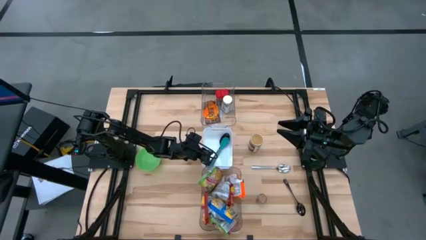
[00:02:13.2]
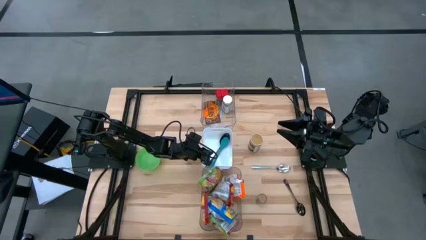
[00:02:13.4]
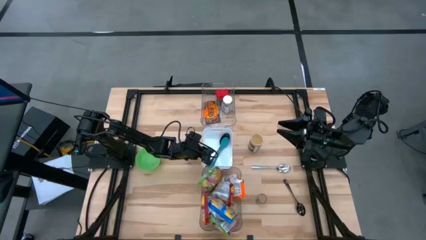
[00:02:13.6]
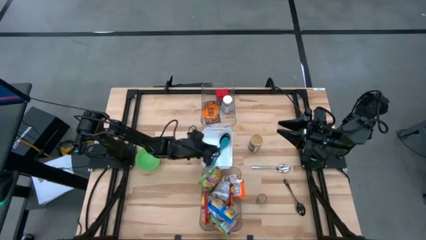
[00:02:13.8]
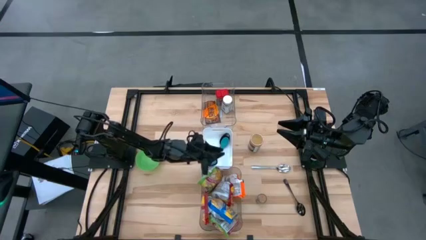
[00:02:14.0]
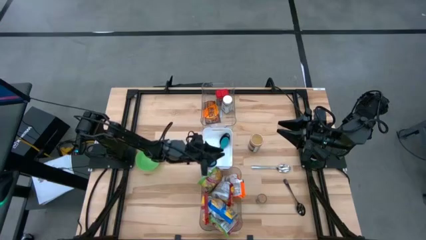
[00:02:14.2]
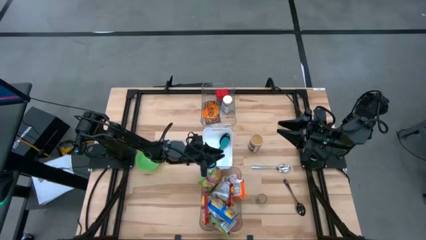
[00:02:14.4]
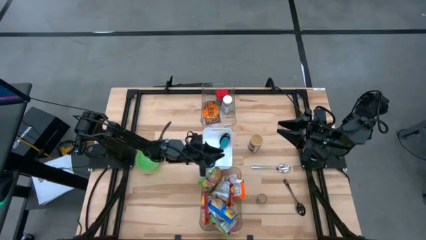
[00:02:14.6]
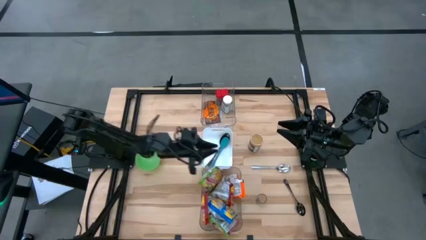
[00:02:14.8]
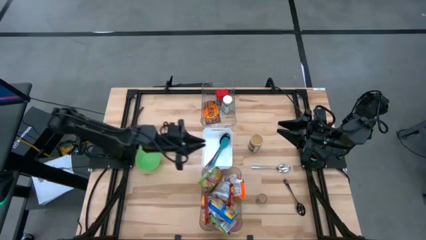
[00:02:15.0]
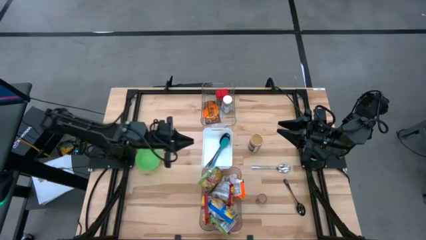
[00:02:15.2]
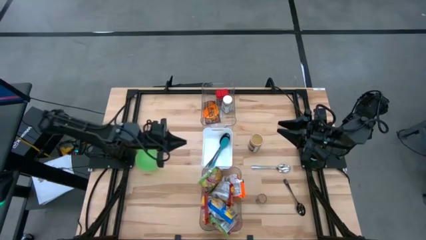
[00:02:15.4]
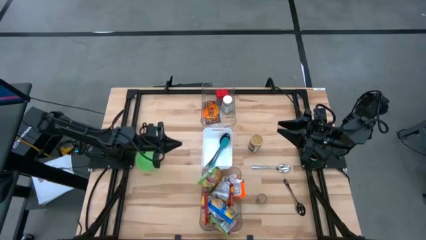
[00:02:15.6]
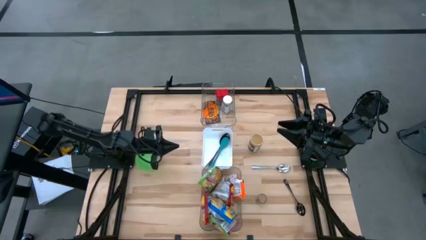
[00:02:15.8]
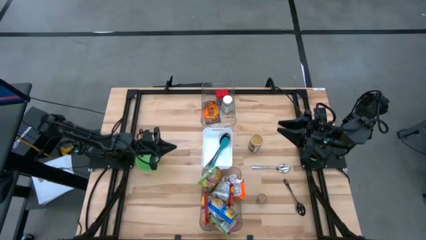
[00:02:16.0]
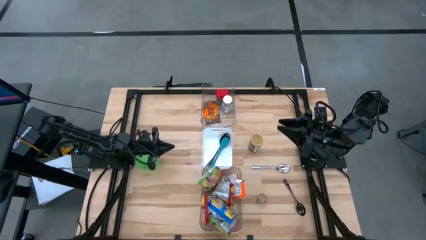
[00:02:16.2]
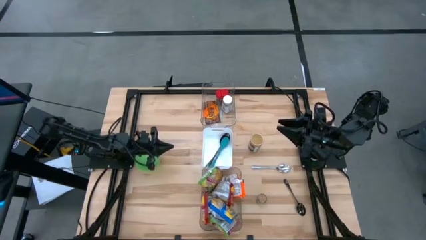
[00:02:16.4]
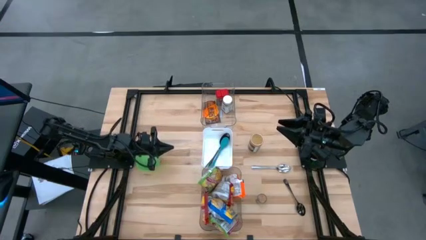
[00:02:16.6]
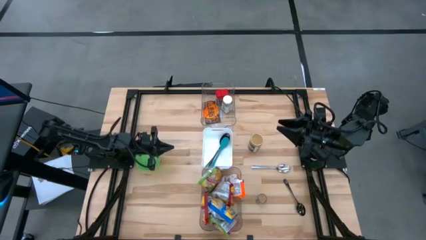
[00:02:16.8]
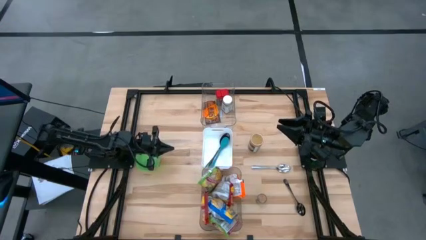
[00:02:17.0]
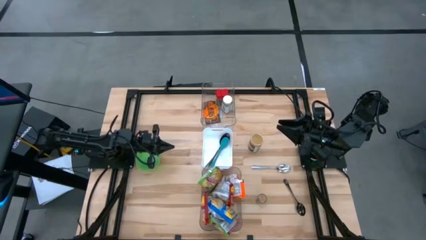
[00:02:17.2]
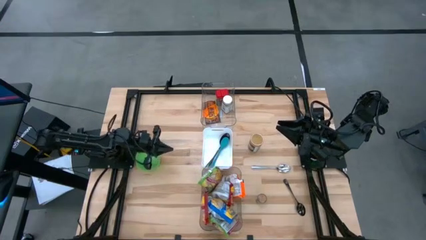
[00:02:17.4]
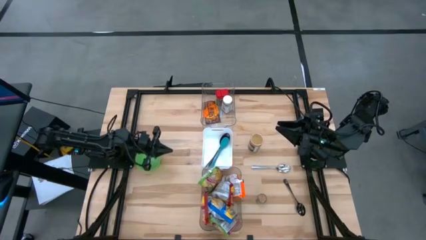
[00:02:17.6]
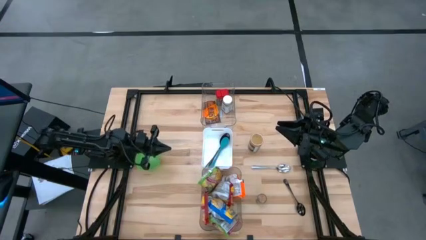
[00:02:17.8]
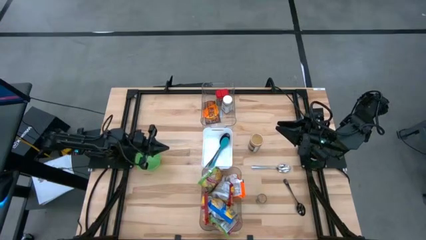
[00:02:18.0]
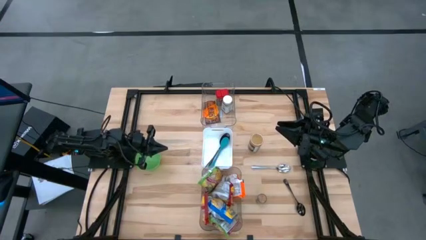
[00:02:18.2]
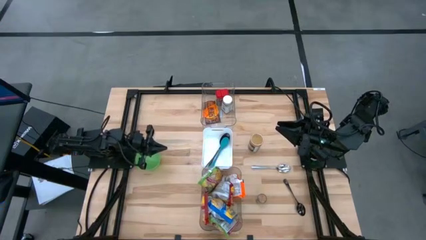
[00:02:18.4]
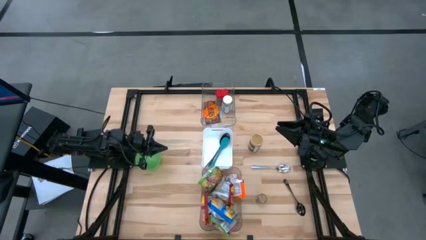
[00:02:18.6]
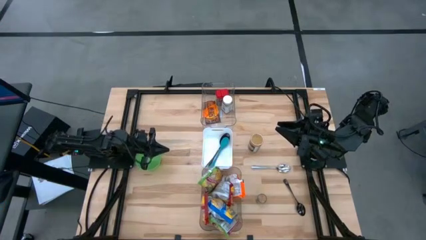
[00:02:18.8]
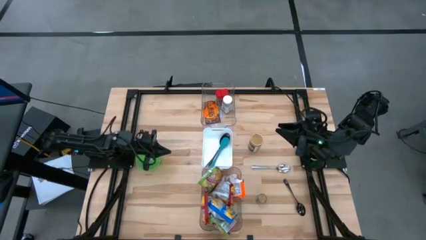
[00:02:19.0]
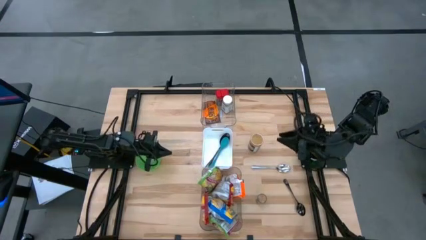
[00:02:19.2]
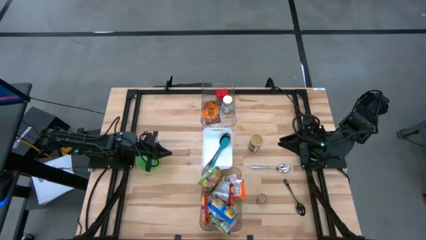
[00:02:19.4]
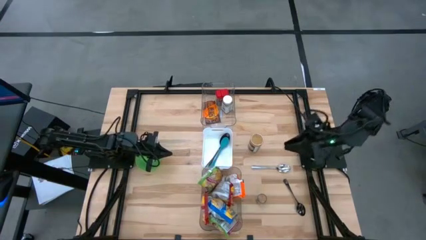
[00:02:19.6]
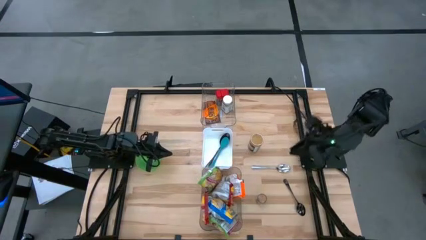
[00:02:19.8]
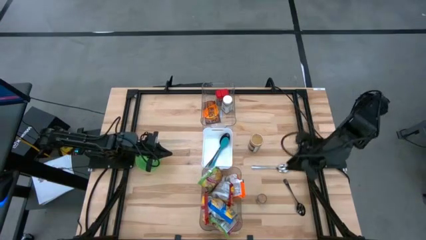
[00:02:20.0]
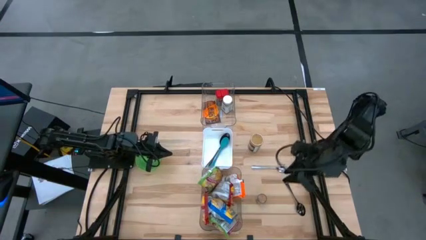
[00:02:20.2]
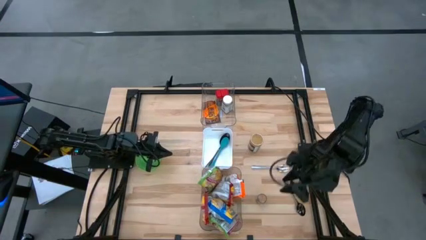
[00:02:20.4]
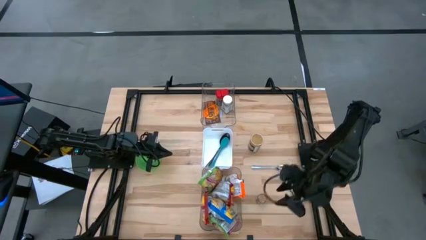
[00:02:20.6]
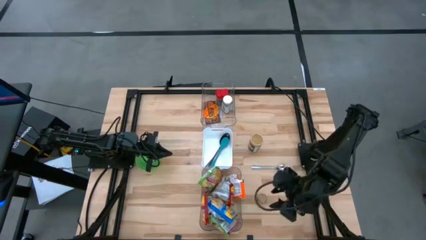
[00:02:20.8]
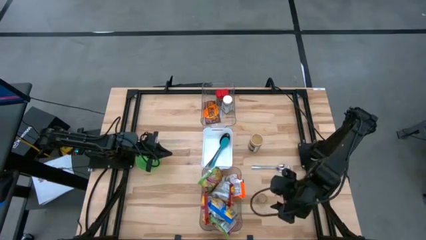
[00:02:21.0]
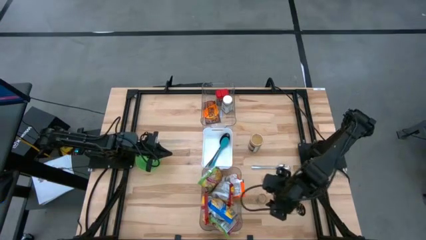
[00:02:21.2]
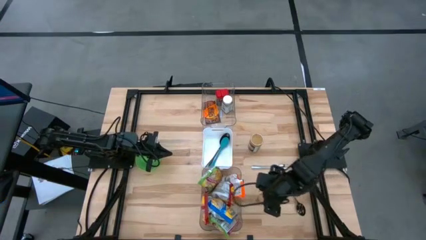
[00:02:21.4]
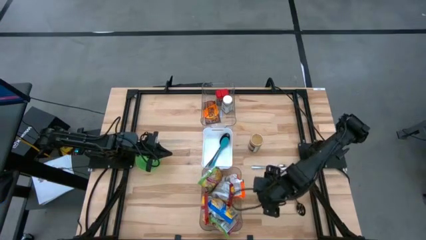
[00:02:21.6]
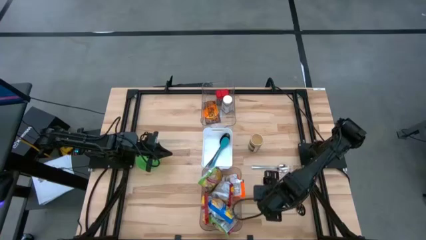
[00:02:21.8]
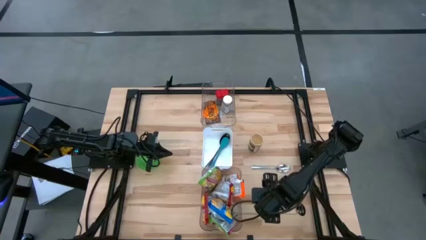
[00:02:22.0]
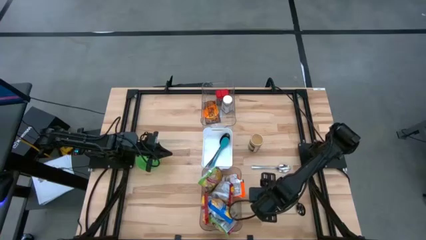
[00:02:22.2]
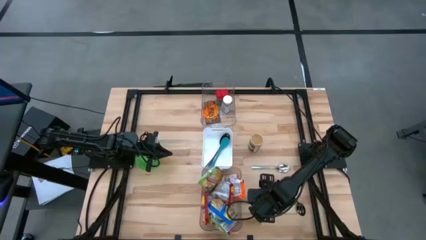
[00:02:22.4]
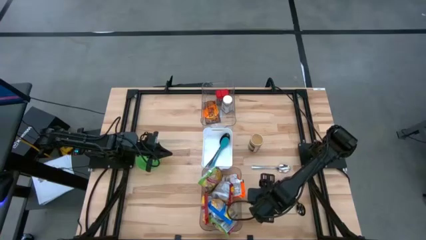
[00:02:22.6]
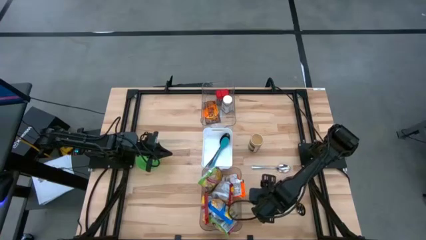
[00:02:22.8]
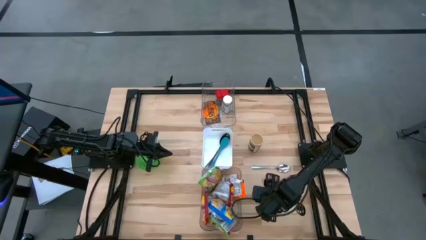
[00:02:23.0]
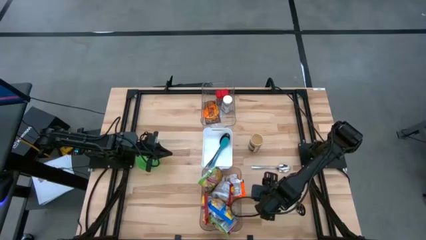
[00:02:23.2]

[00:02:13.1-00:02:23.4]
Task: Pick & Place Food Item
Put the brown seasoning bottle into the top transparent bin

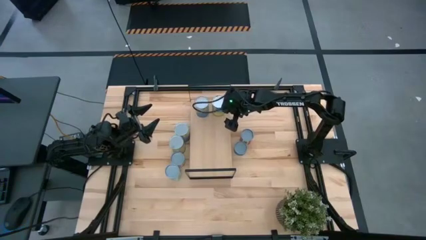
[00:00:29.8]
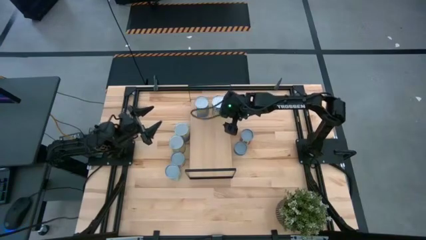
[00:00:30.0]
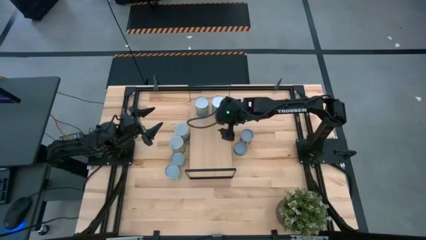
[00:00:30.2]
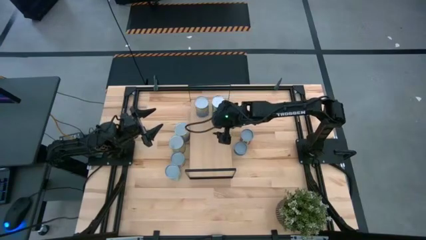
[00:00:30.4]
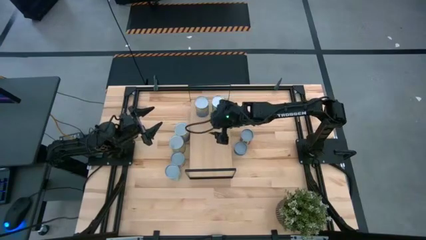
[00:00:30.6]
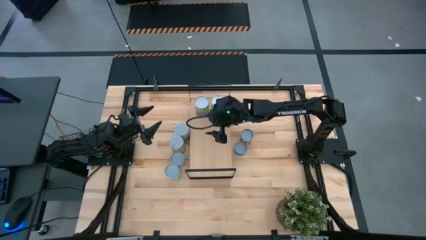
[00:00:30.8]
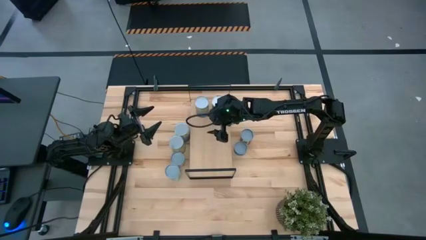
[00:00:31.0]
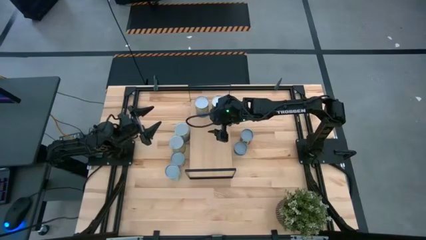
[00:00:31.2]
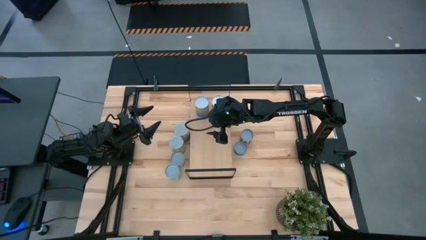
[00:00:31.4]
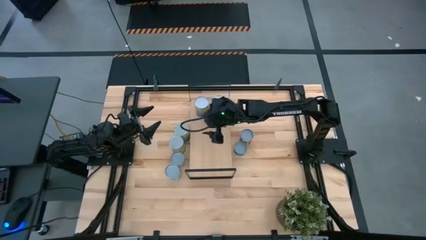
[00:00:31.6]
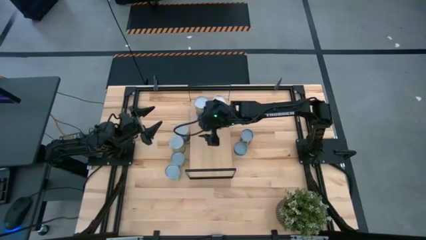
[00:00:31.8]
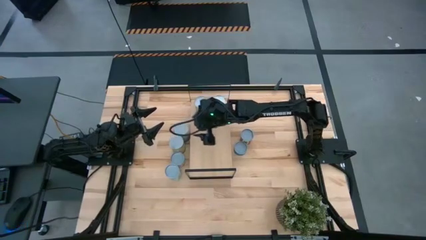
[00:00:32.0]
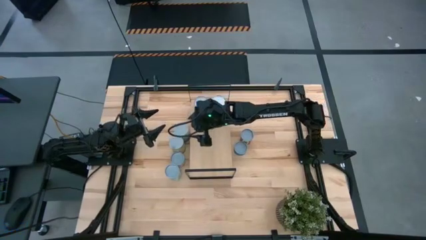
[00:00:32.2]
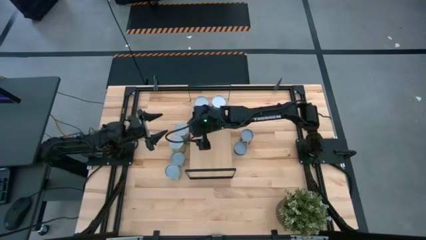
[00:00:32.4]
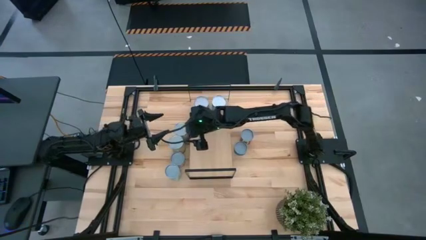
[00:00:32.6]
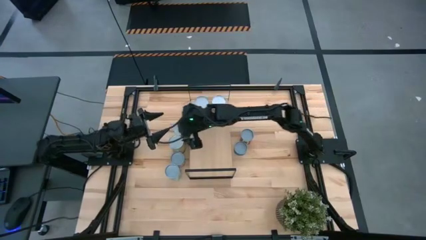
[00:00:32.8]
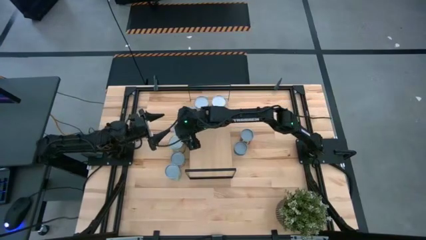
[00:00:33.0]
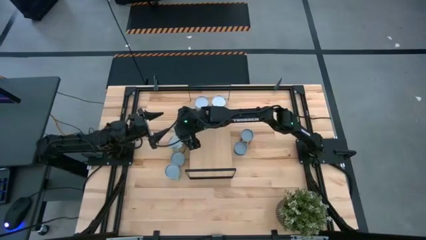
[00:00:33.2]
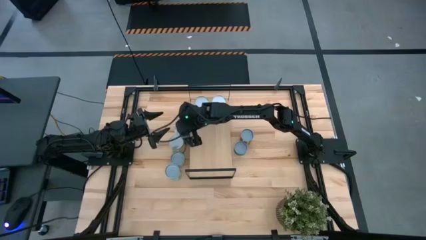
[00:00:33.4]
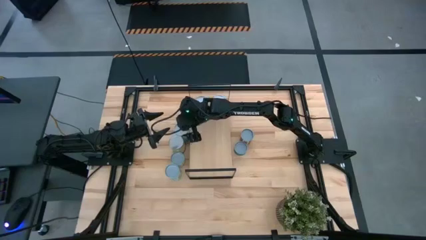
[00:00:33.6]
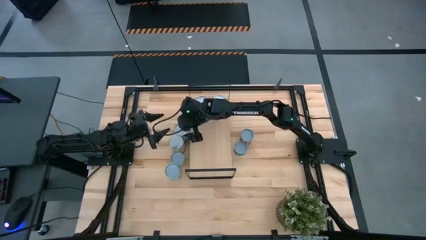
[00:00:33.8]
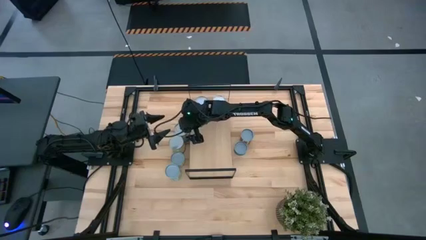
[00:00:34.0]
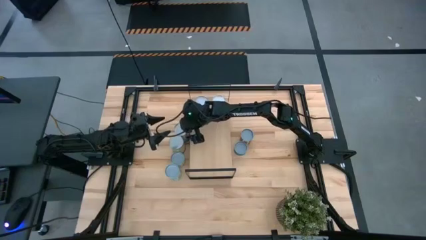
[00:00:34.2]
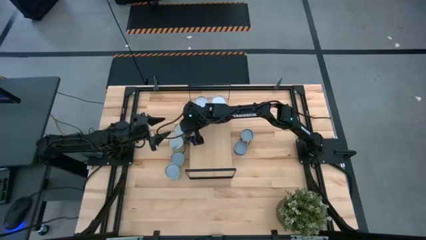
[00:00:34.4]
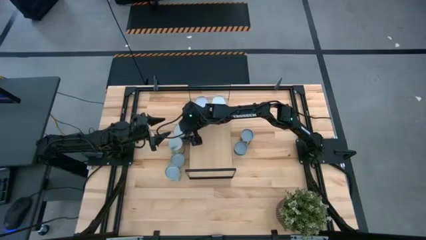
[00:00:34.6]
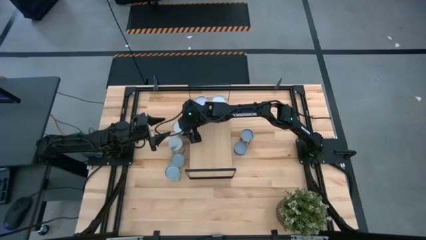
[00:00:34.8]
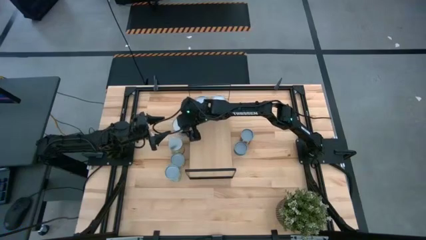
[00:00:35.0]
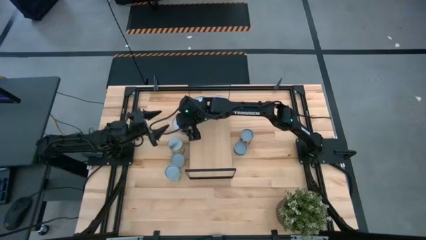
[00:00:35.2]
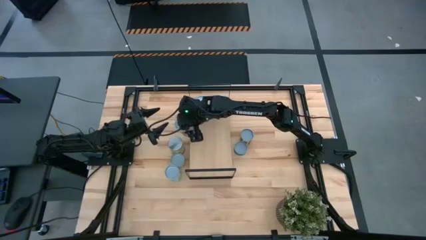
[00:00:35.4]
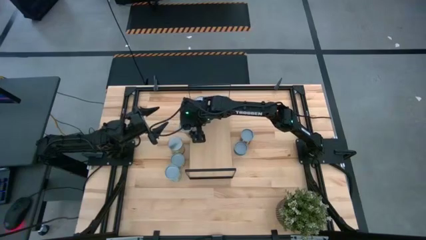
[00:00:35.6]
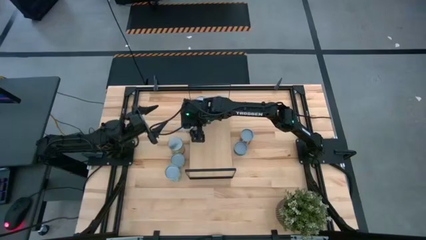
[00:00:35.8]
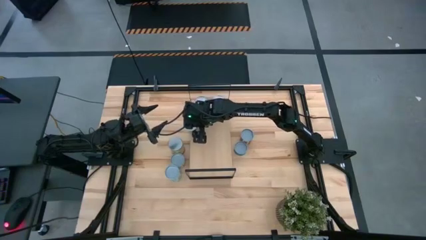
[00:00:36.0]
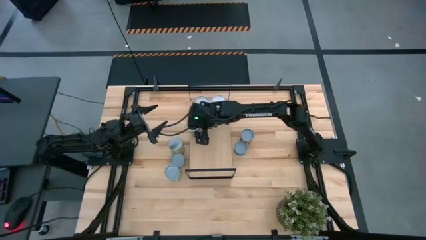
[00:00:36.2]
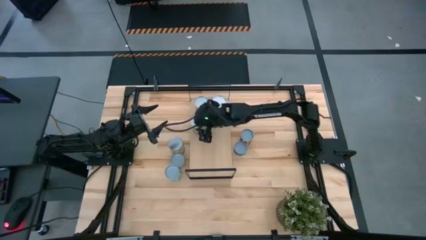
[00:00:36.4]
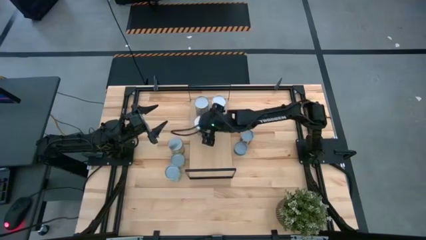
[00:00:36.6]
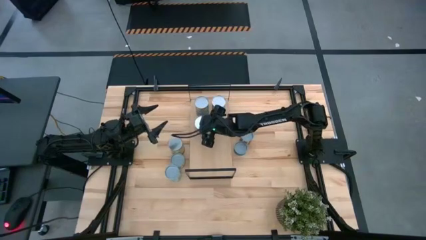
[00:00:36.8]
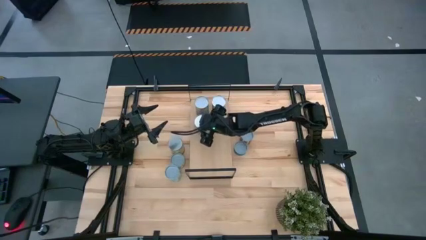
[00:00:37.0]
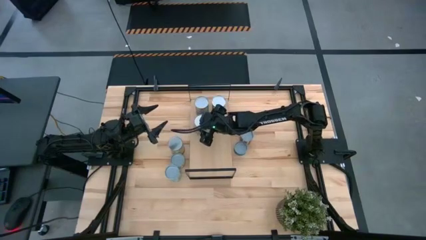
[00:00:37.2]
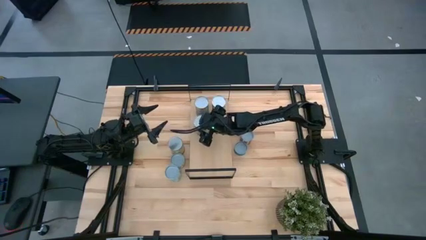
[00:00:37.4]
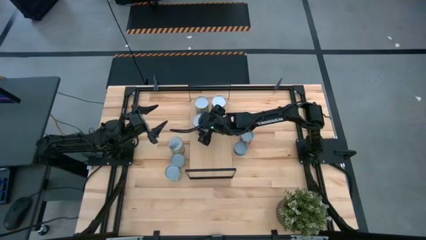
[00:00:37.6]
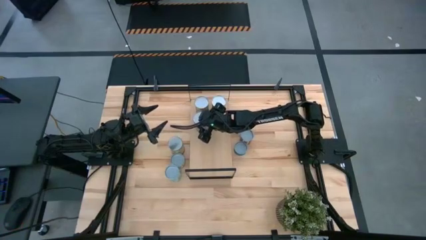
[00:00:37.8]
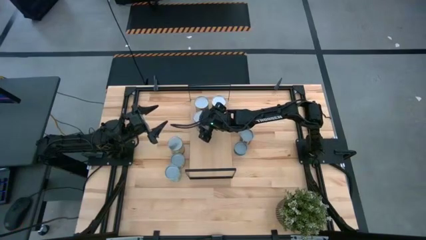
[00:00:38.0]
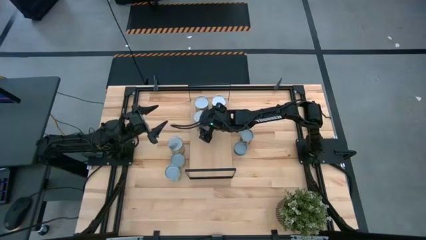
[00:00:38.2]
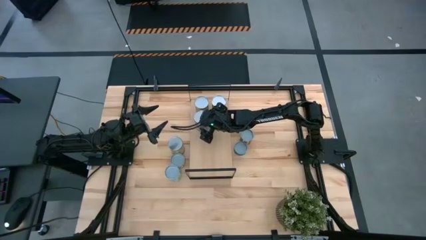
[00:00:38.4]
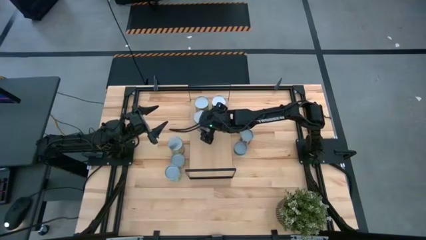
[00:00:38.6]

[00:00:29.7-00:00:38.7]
Task: Pick and place cans onto a shelf
Put the canned peaches onto the shelf
